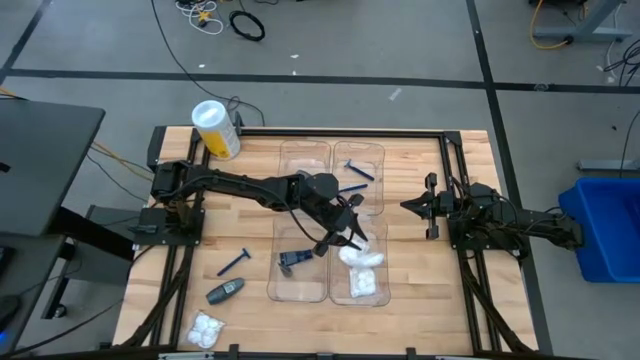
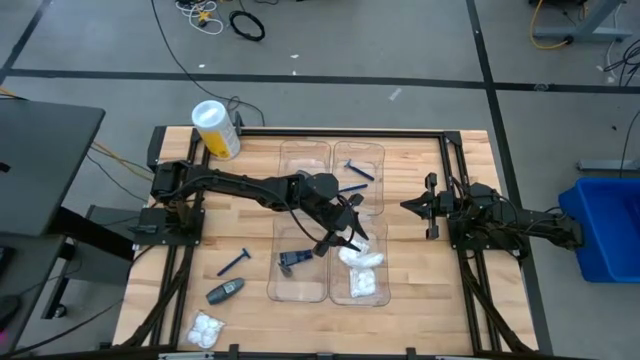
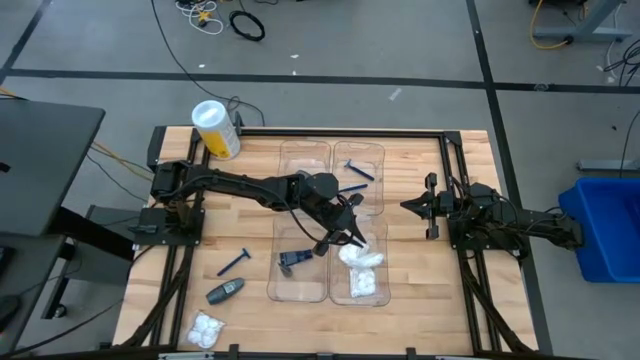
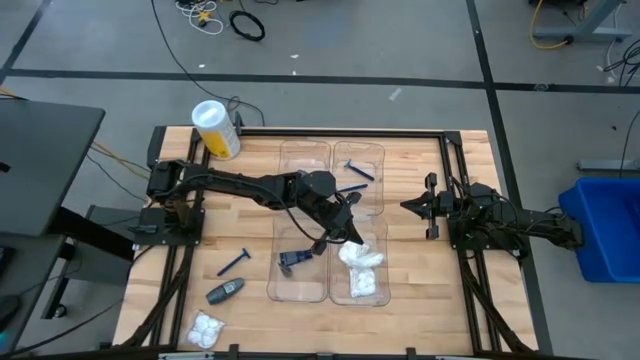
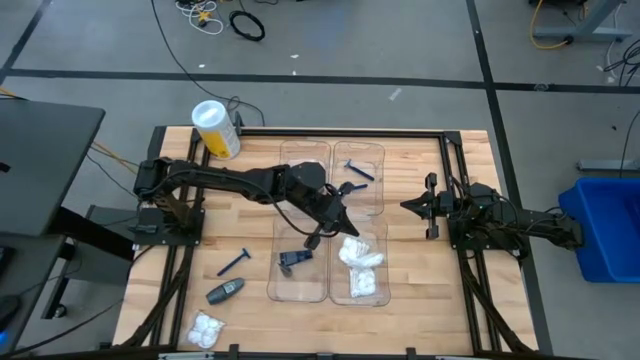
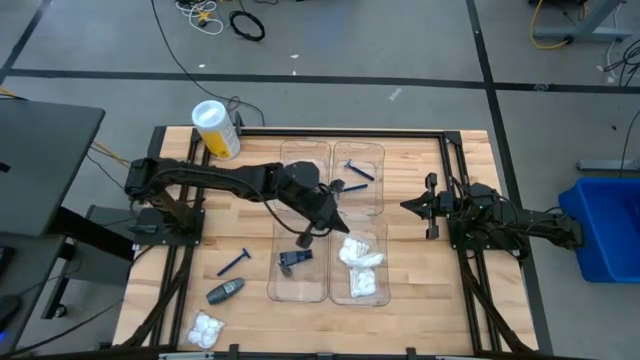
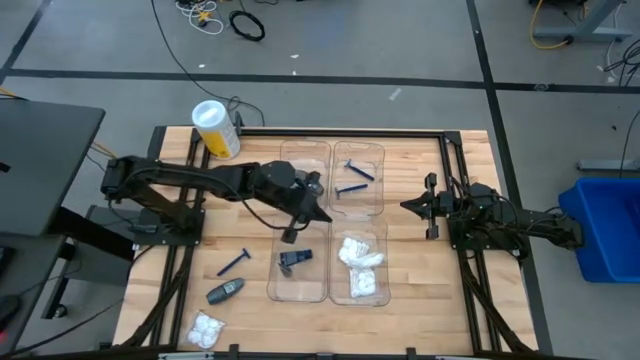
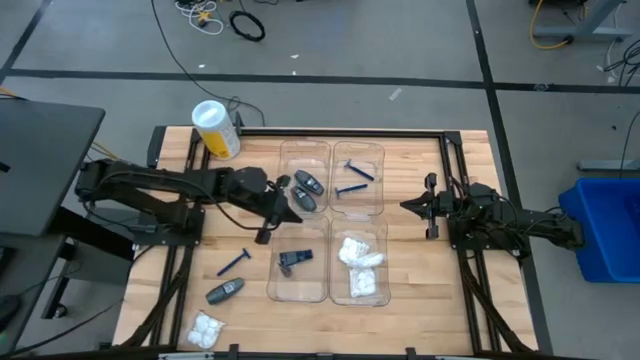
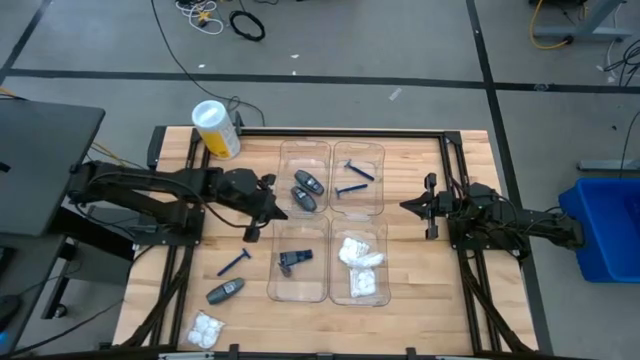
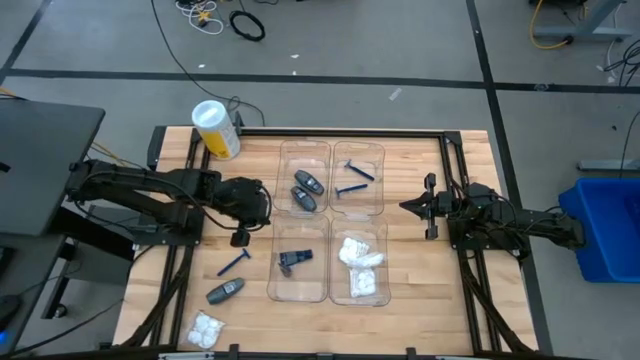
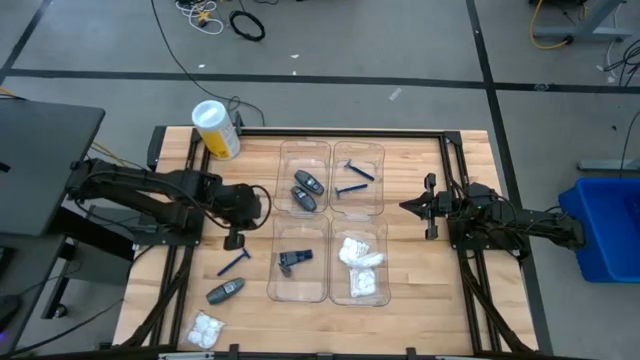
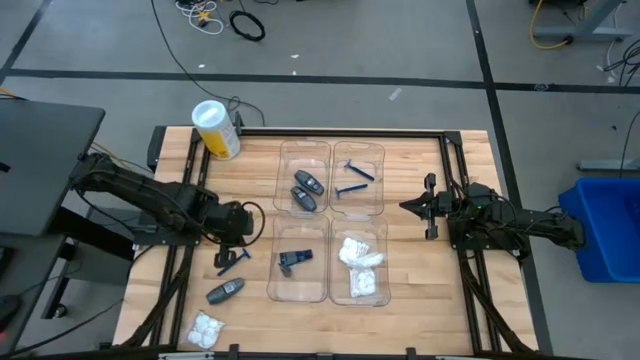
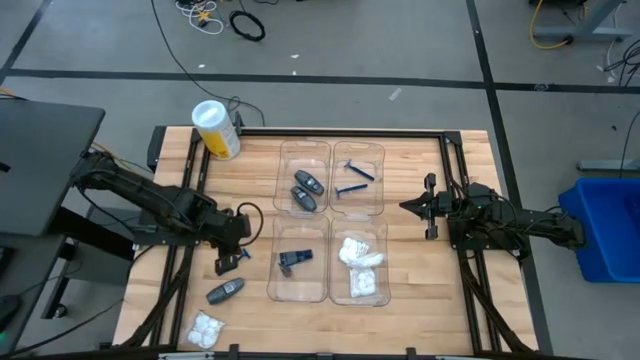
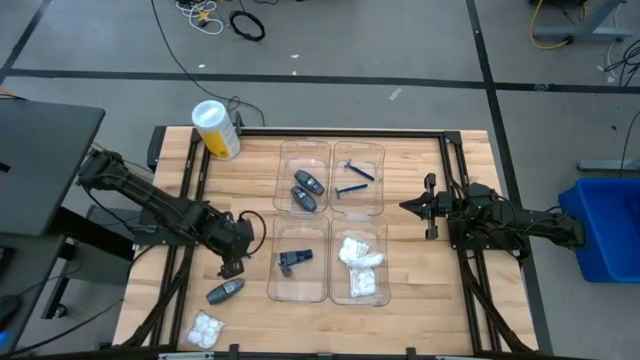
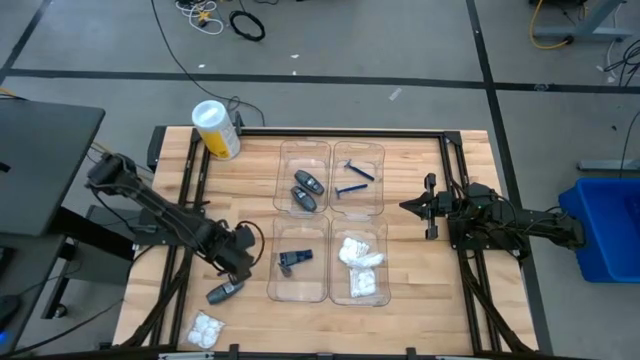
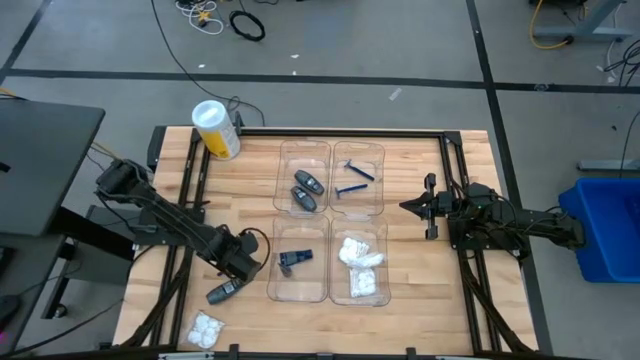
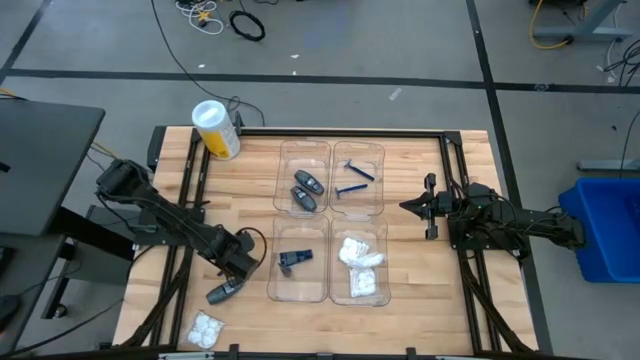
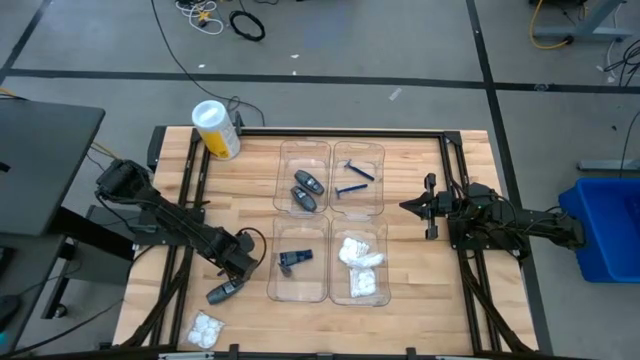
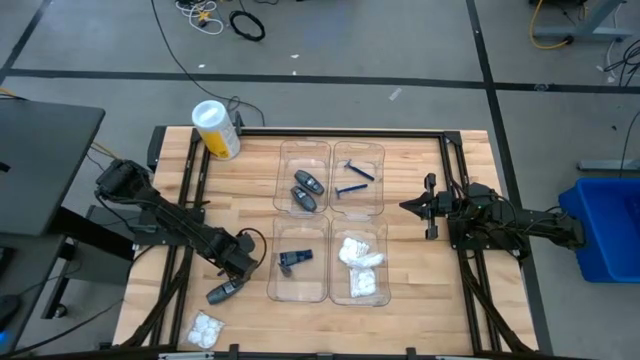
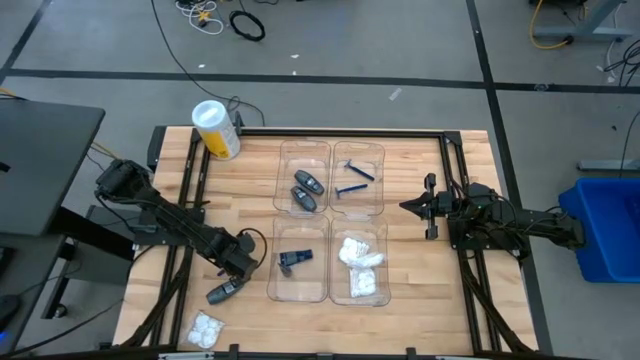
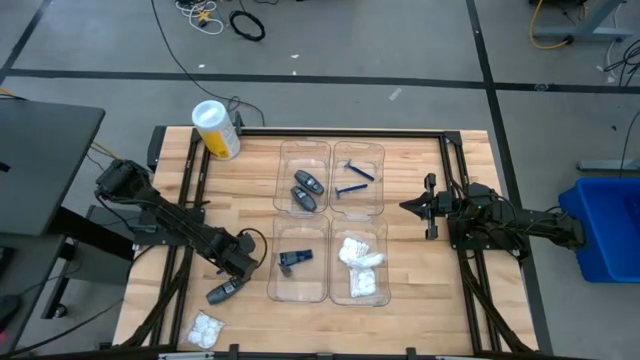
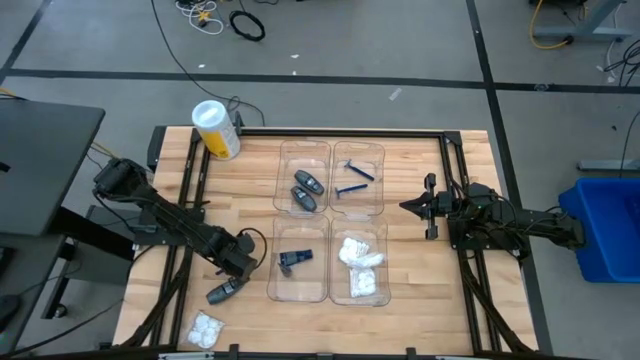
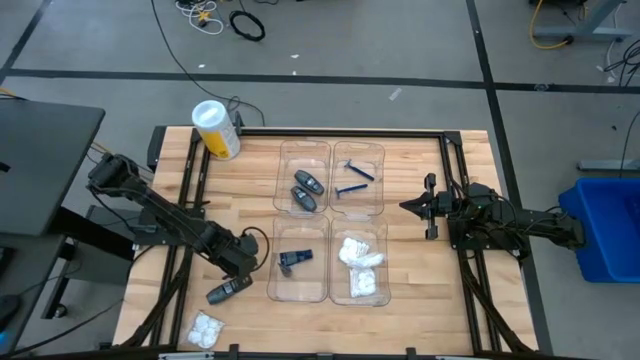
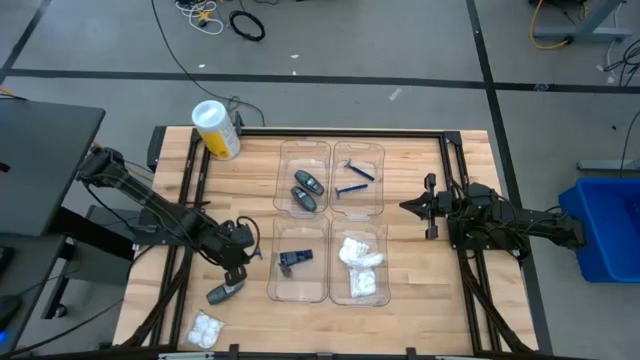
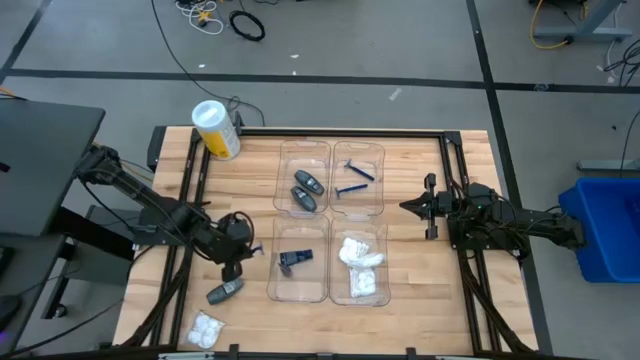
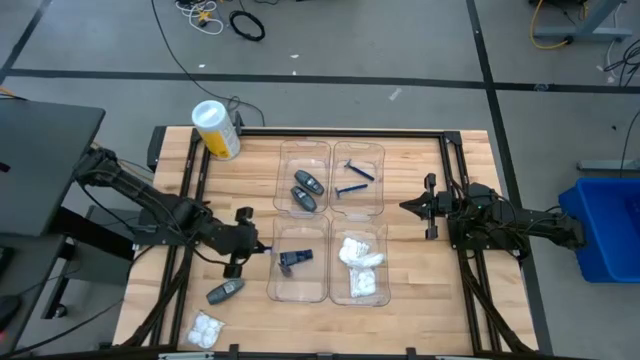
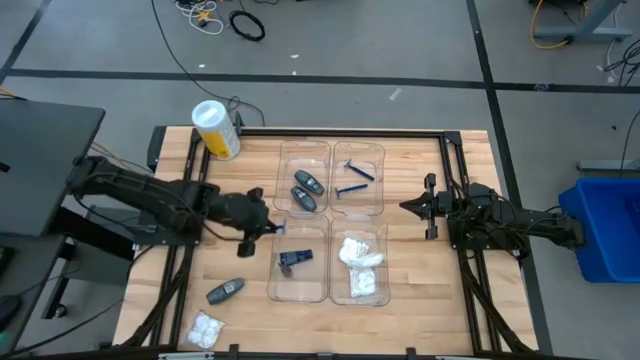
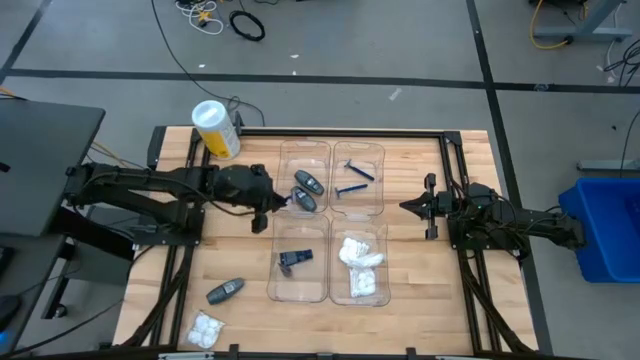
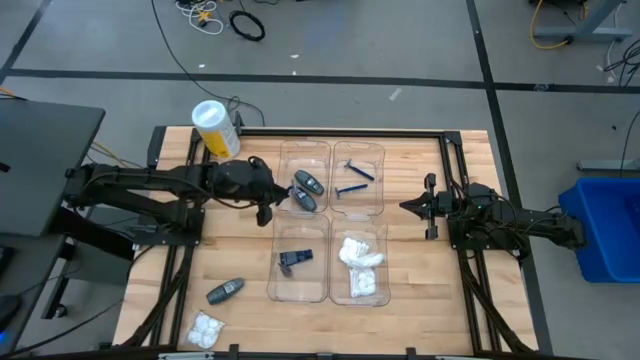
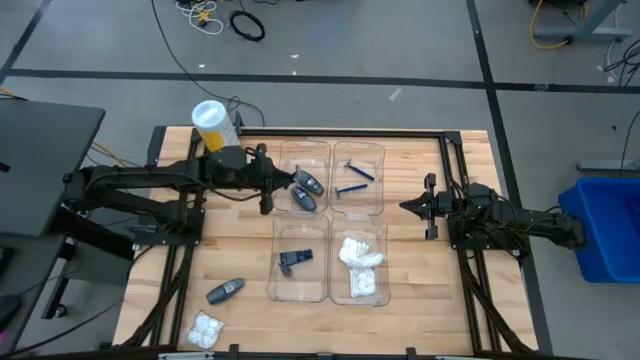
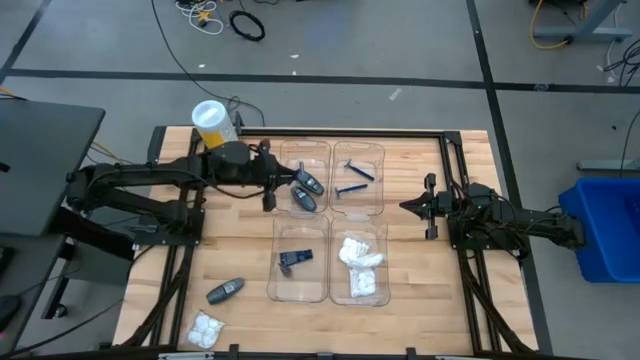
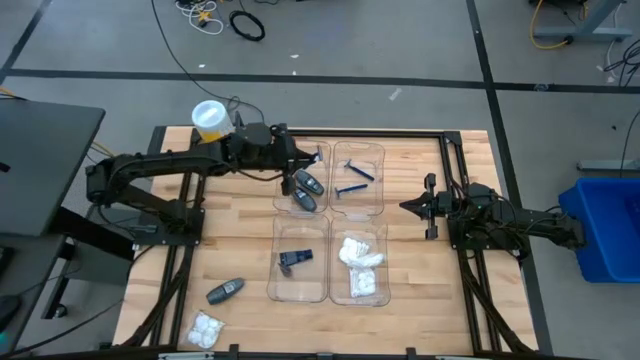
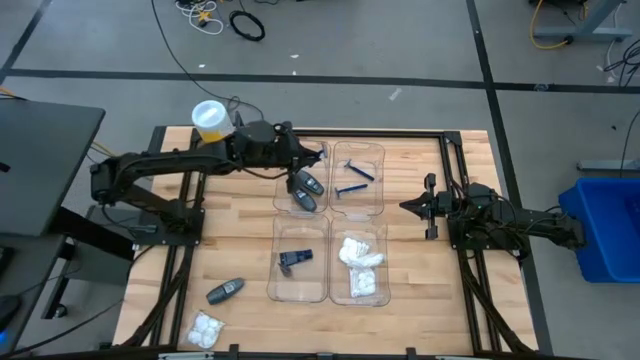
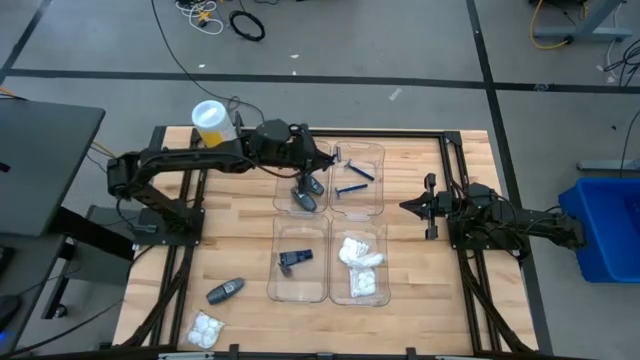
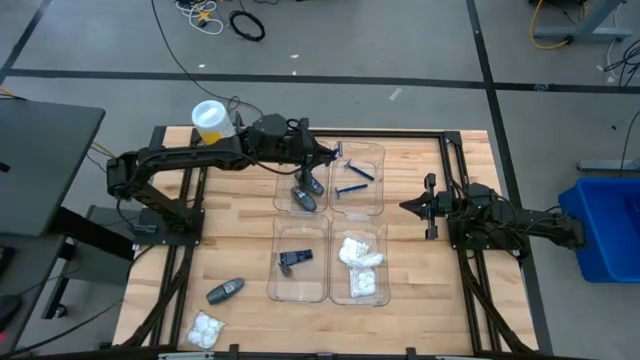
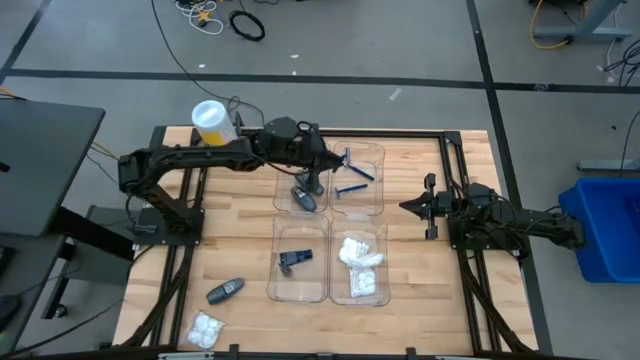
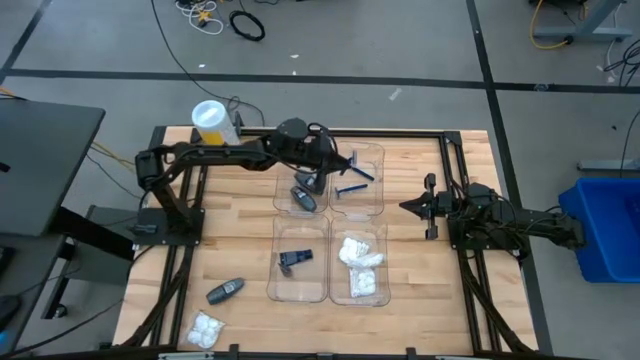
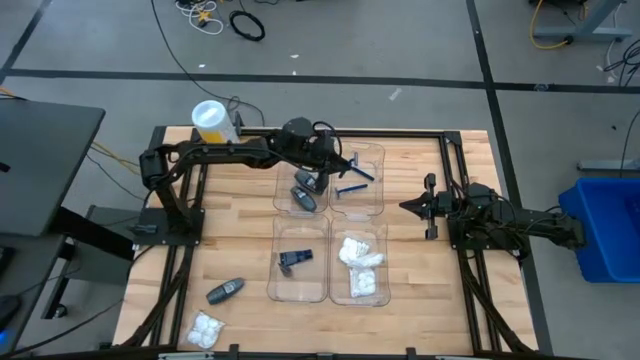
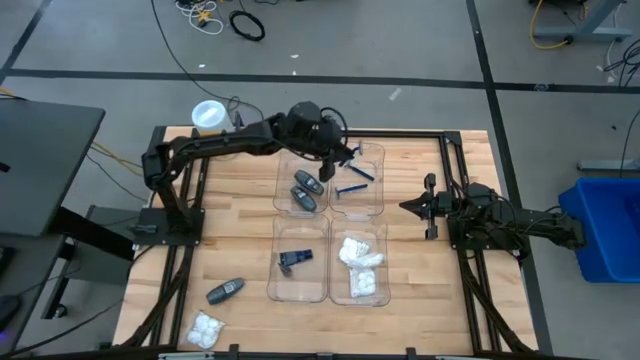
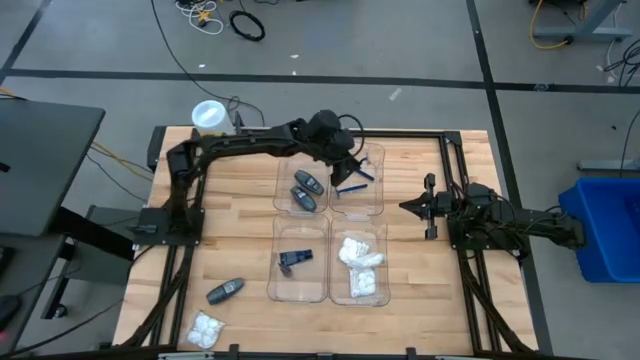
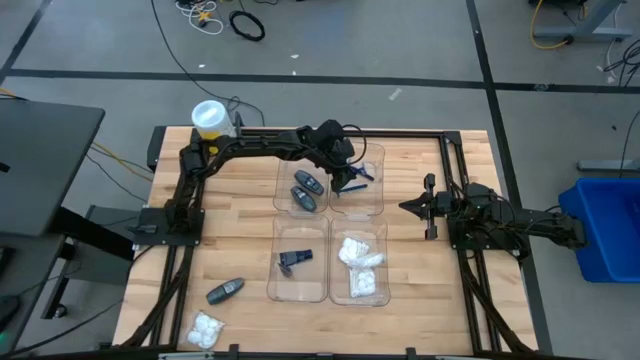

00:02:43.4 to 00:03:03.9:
Task: Pick & Place Travel size toiletries
Put the razor into the top right transparent bin

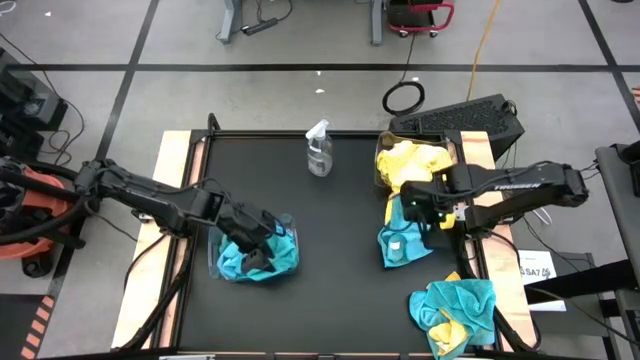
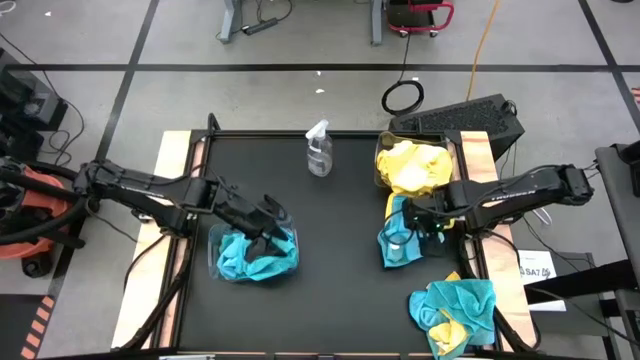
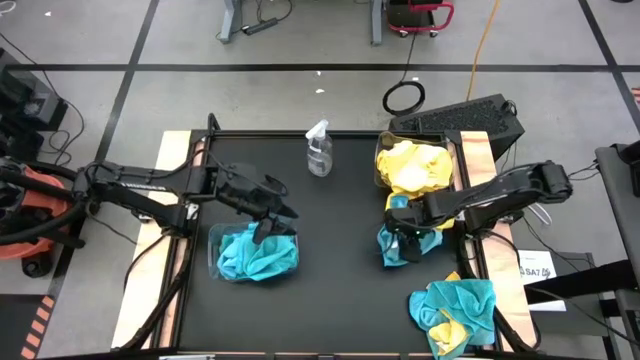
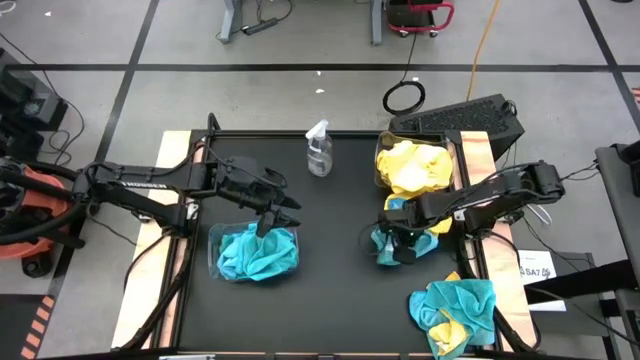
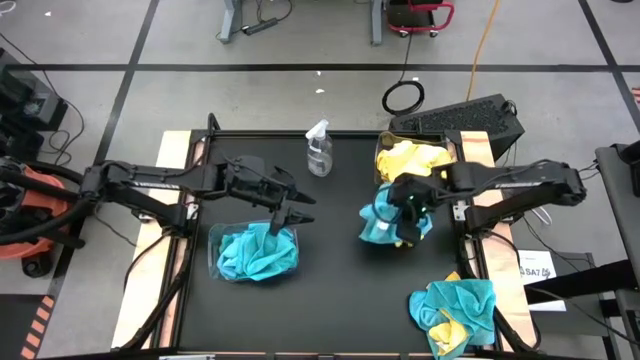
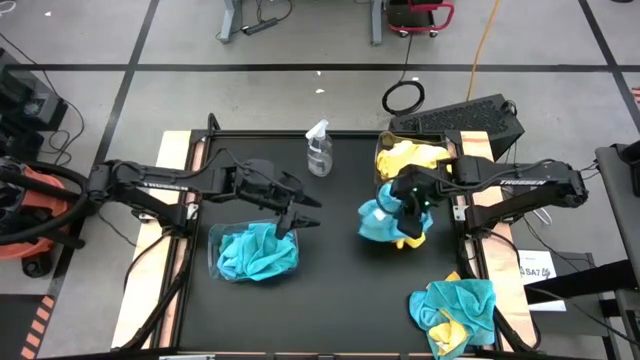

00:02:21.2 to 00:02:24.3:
Task: Sort microfiber towel by color & place in baskets
Put the blue towel into the bottom transparent bin
